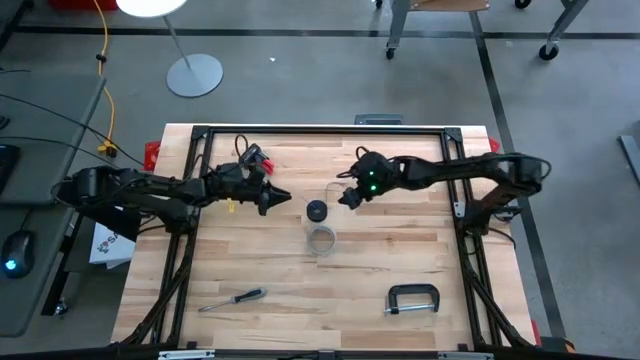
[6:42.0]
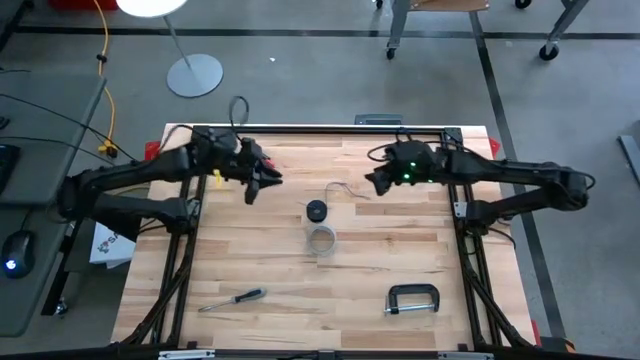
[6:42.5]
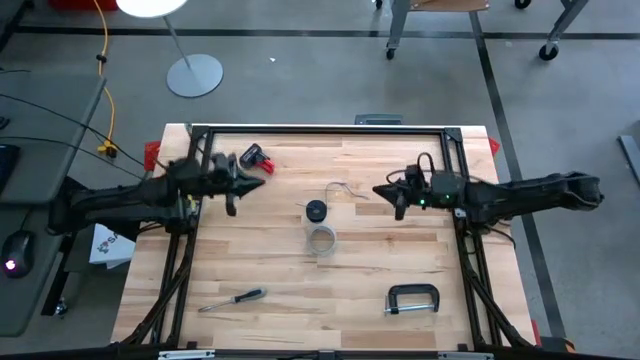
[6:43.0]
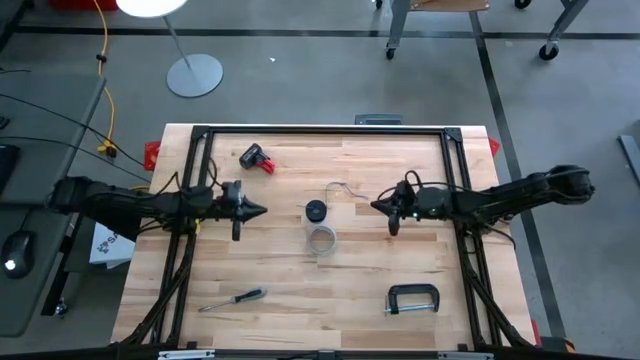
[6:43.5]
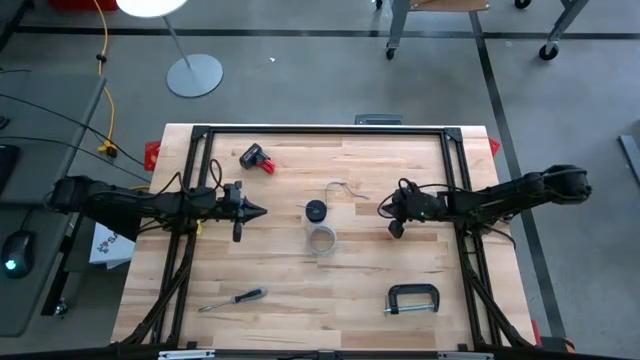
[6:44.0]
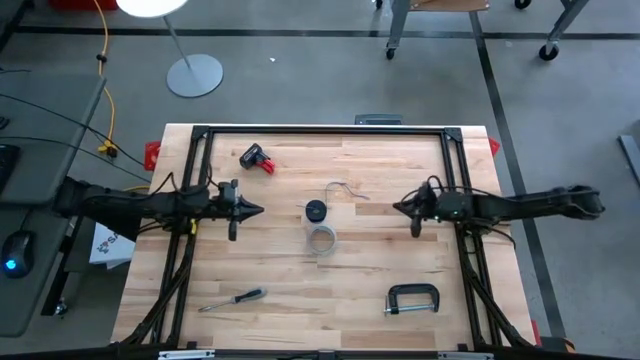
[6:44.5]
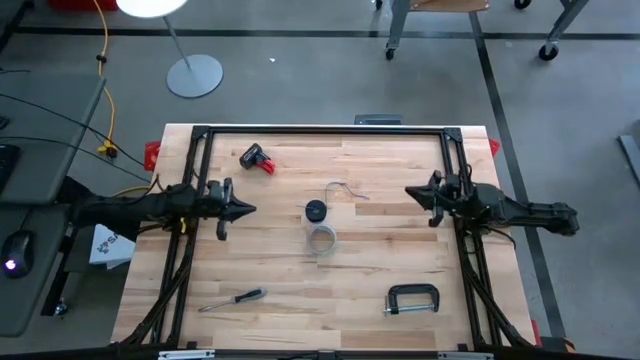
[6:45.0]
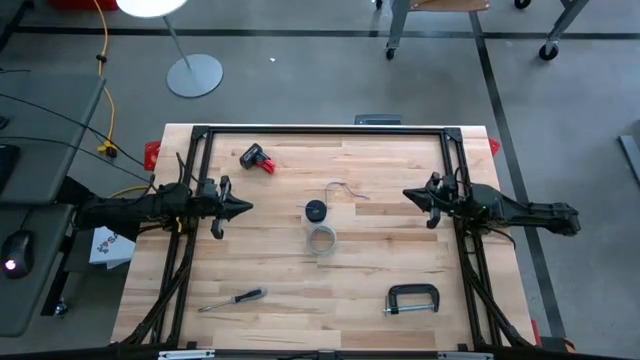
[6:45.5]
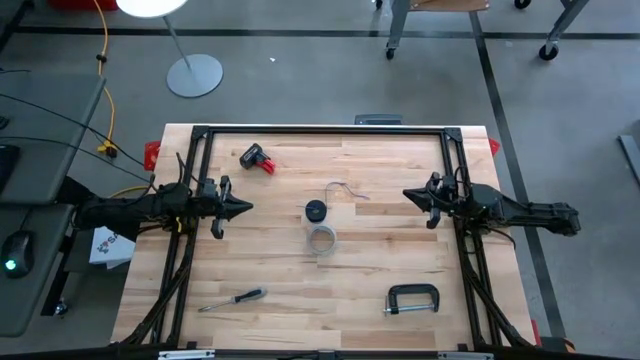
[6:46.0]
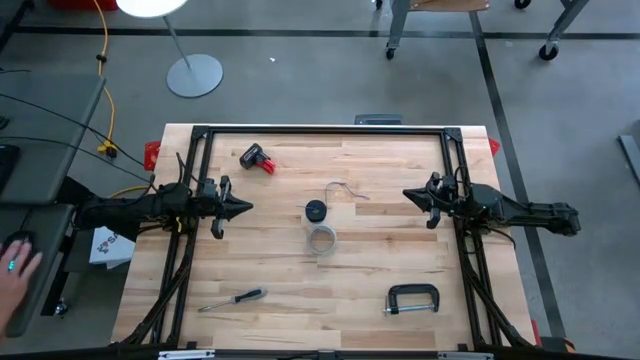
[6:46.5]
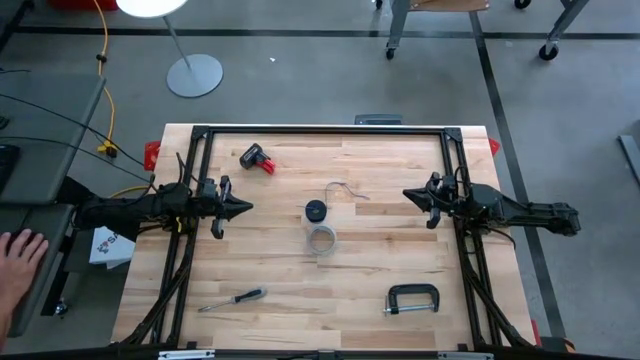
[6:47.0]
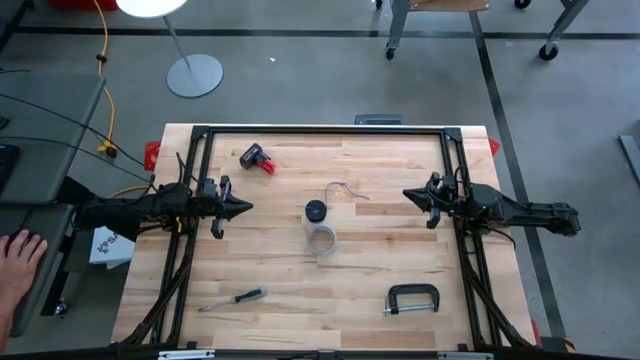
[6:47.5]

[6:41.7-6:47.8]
Task: Coil cords
Return to Home Position

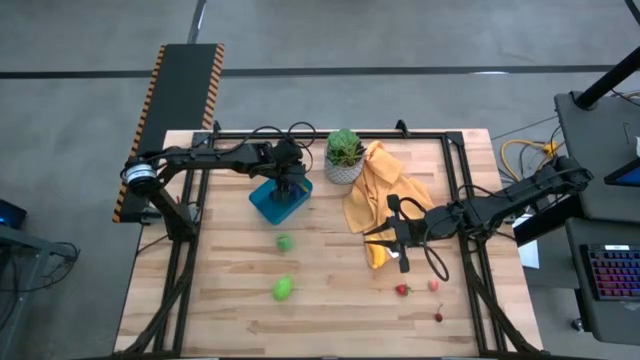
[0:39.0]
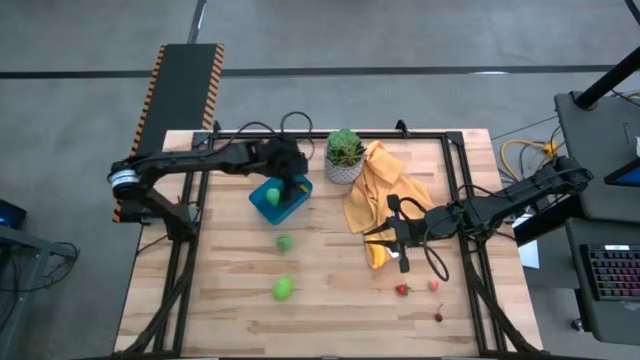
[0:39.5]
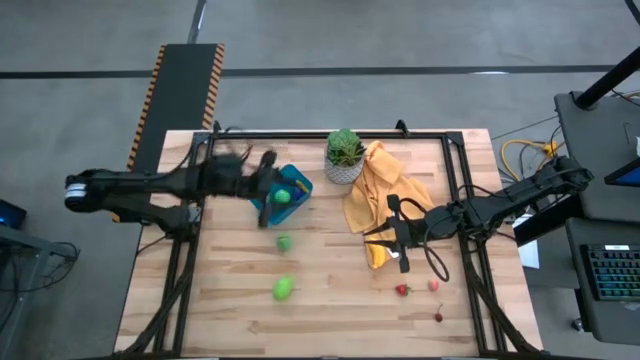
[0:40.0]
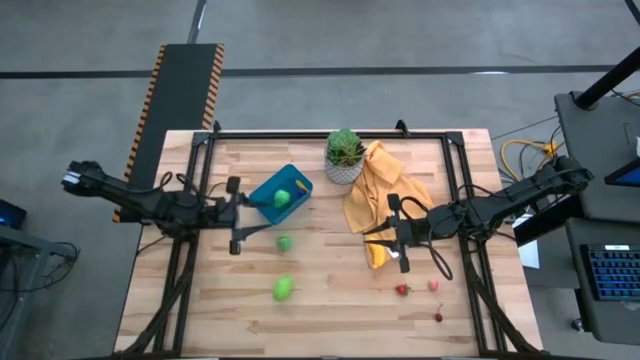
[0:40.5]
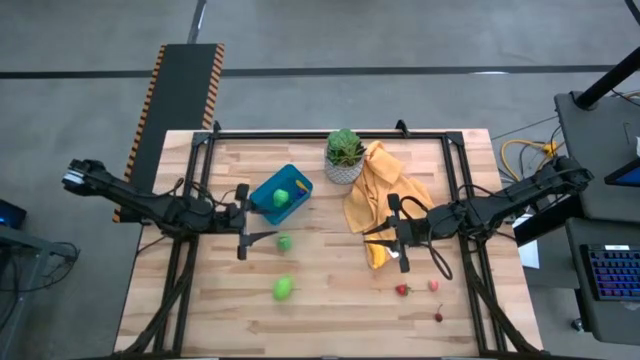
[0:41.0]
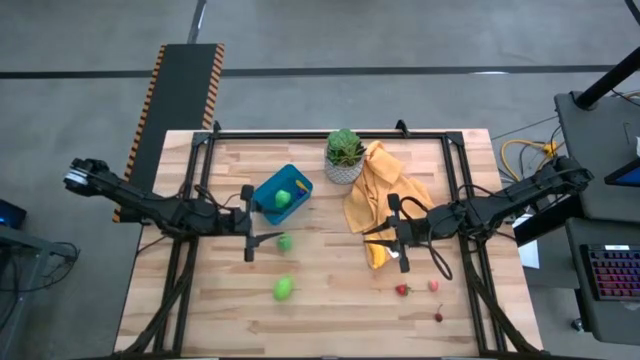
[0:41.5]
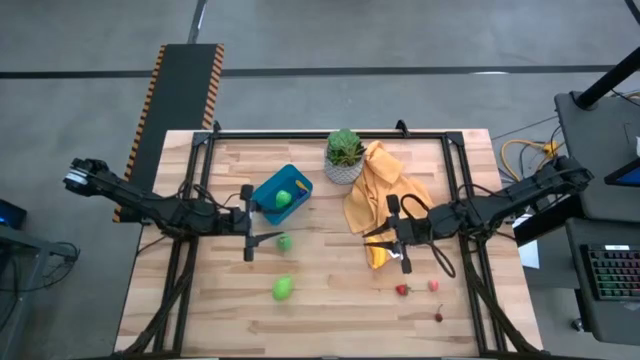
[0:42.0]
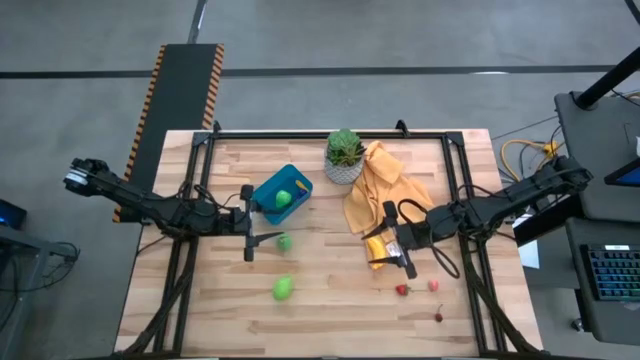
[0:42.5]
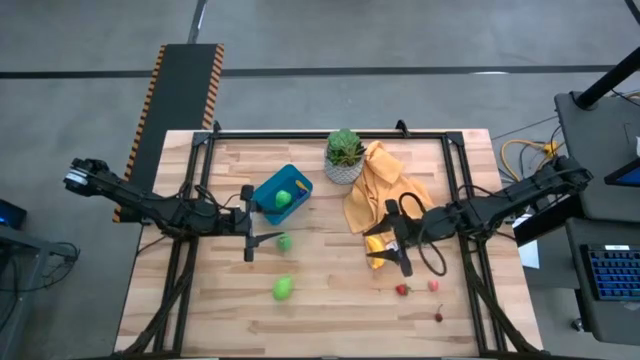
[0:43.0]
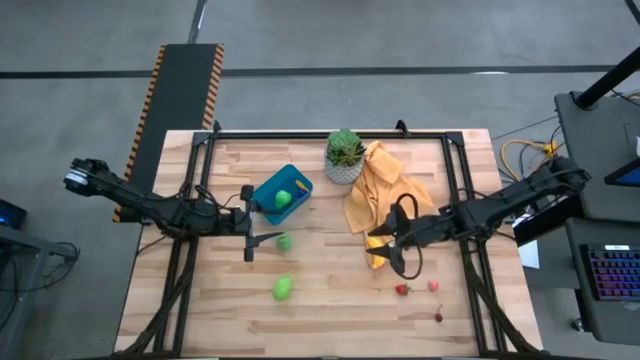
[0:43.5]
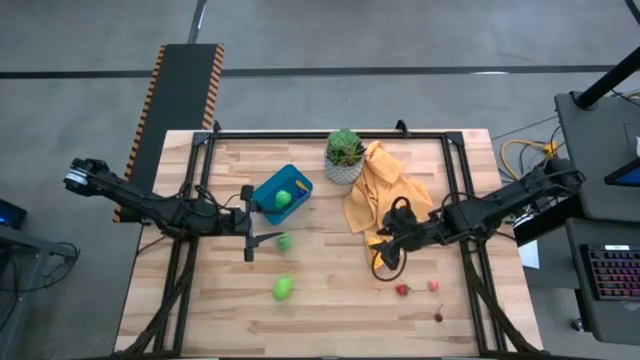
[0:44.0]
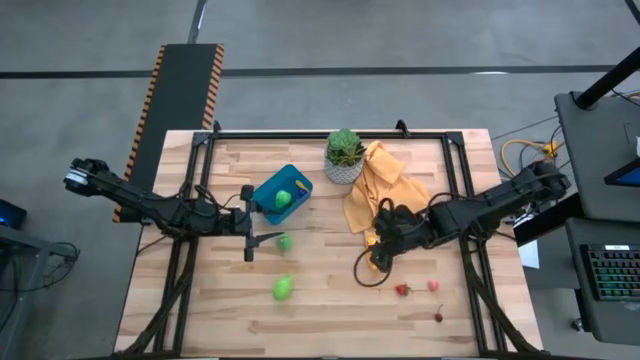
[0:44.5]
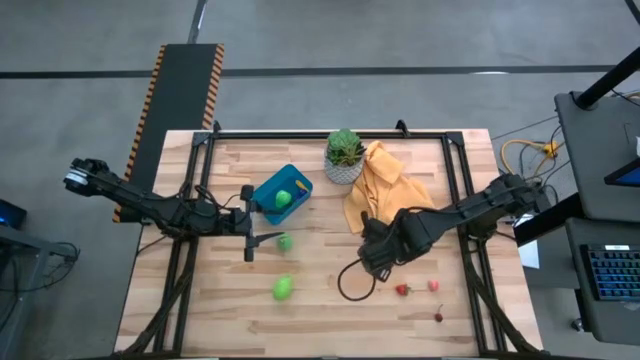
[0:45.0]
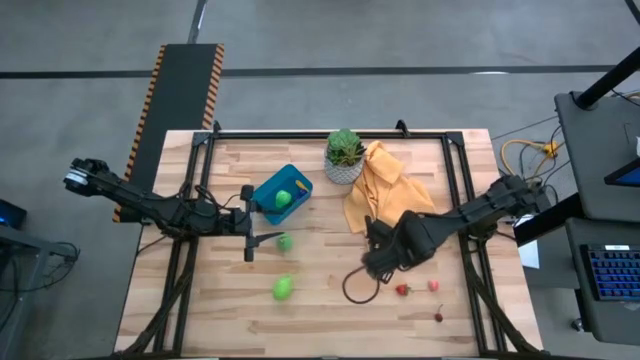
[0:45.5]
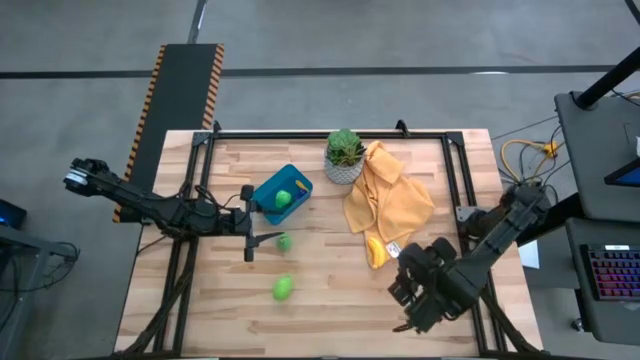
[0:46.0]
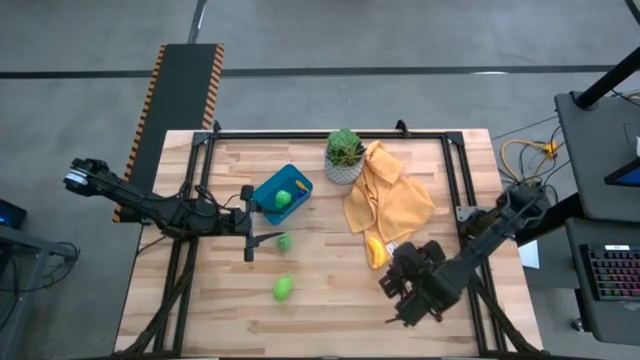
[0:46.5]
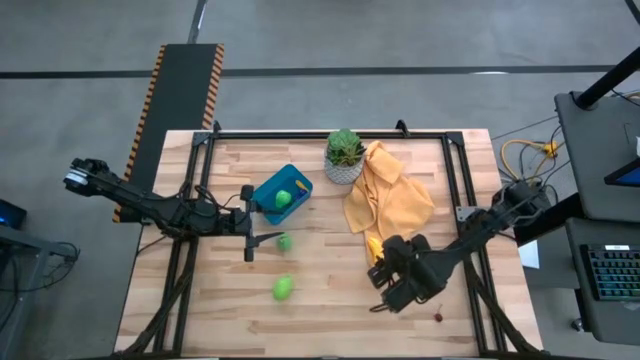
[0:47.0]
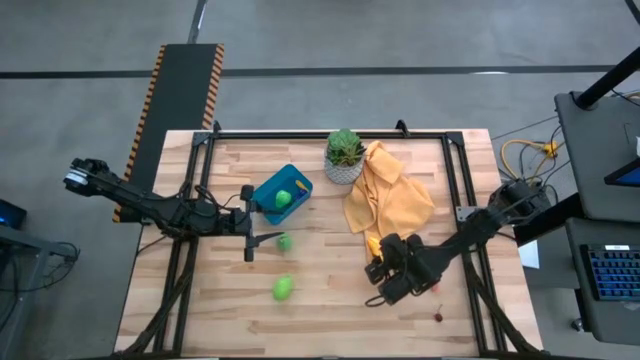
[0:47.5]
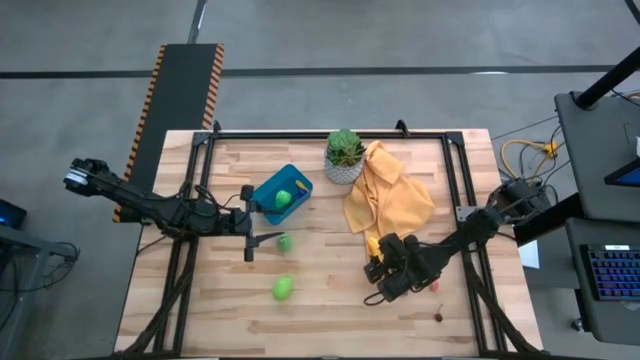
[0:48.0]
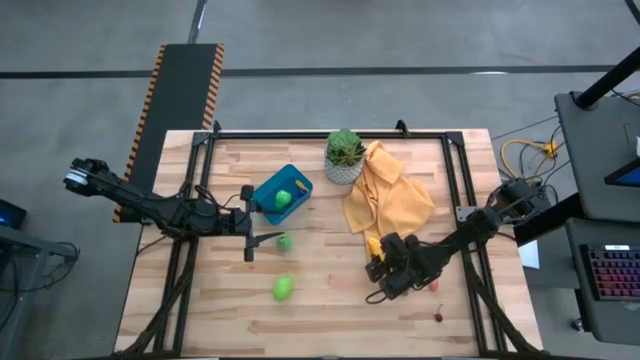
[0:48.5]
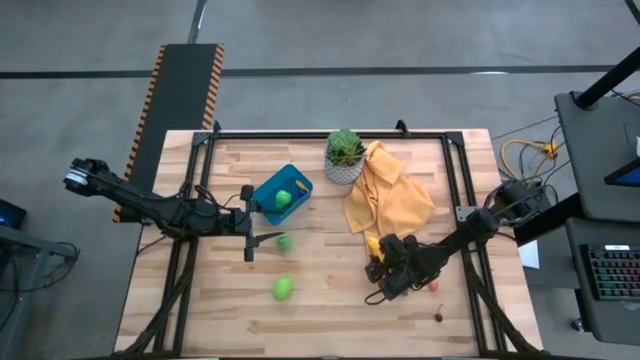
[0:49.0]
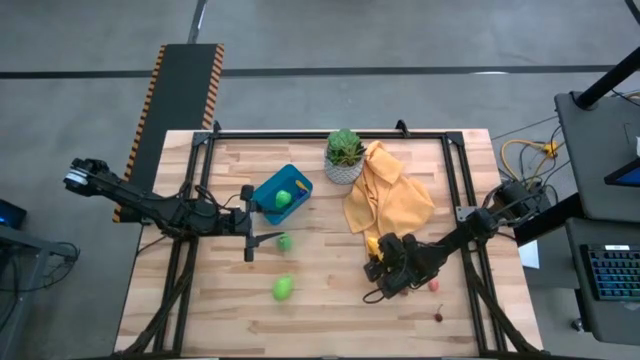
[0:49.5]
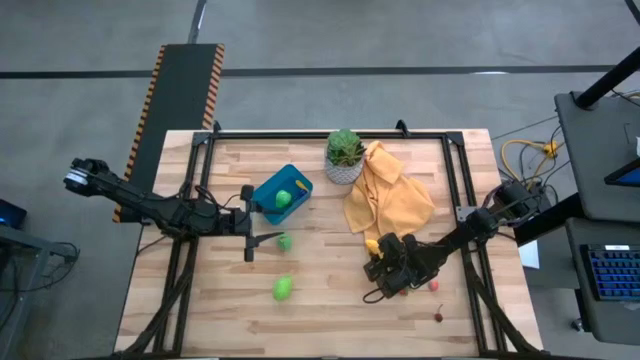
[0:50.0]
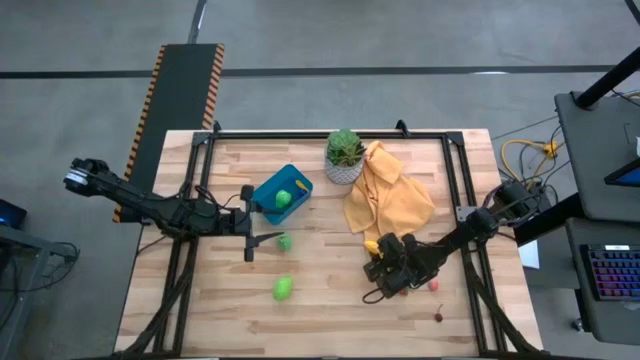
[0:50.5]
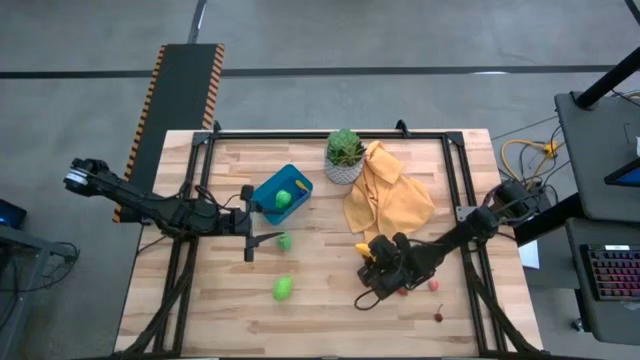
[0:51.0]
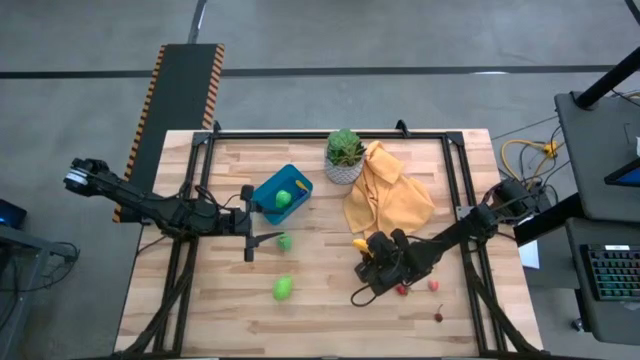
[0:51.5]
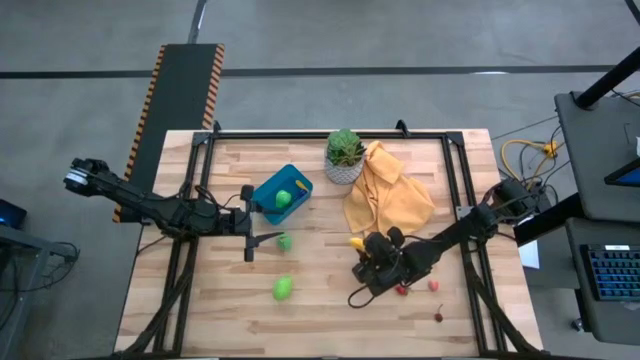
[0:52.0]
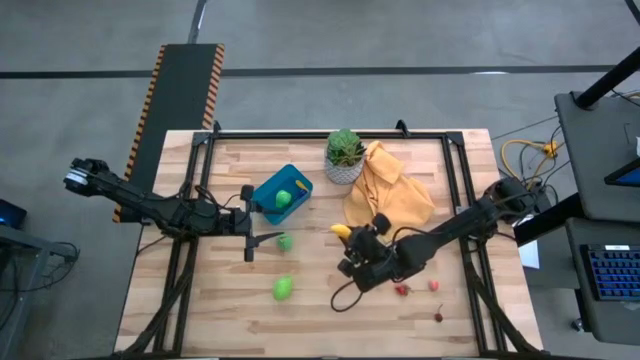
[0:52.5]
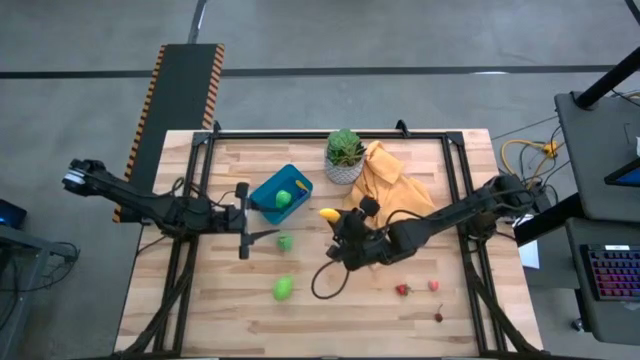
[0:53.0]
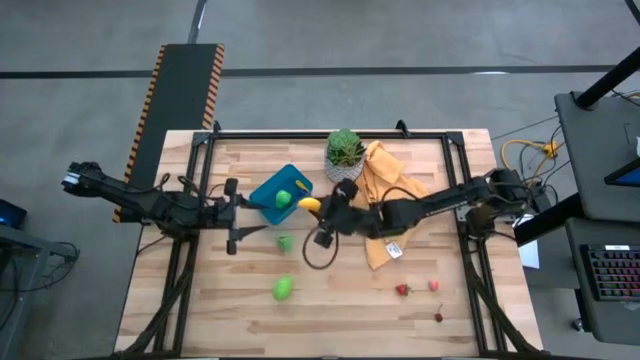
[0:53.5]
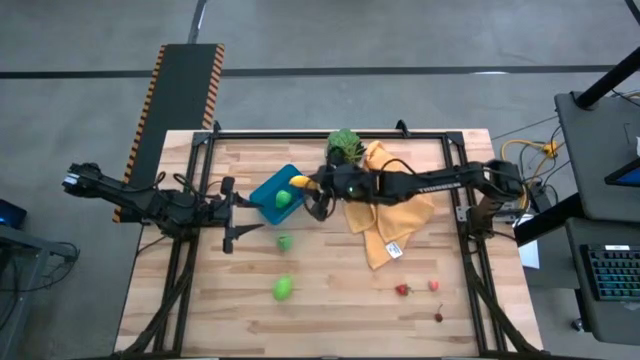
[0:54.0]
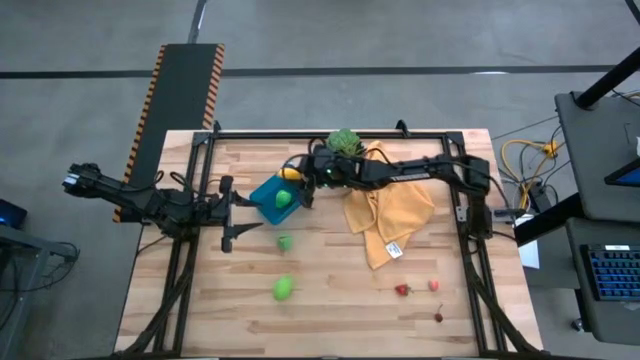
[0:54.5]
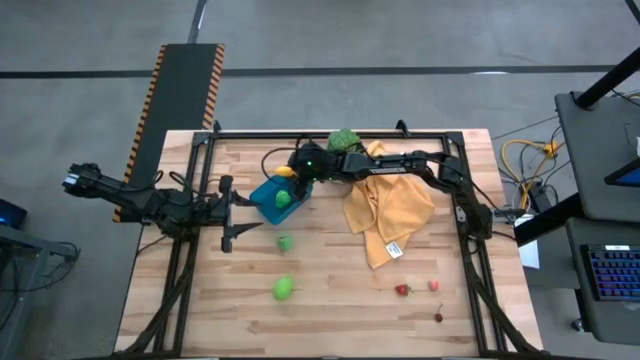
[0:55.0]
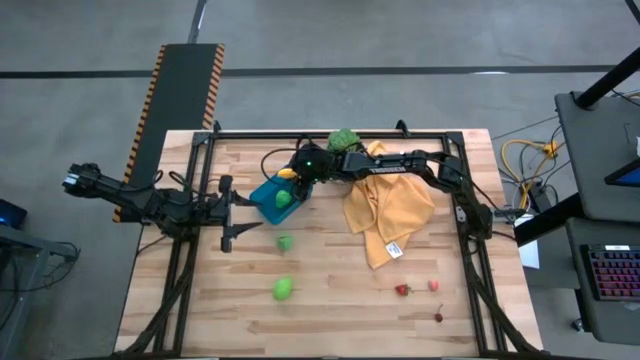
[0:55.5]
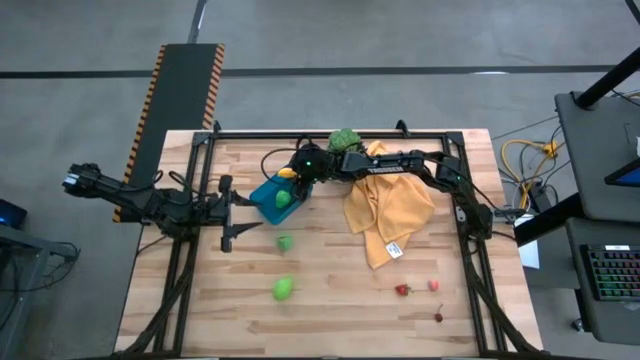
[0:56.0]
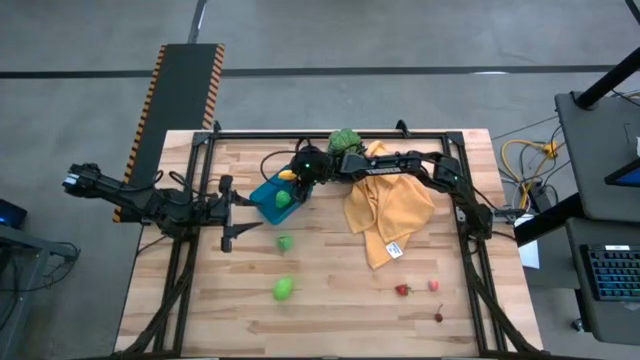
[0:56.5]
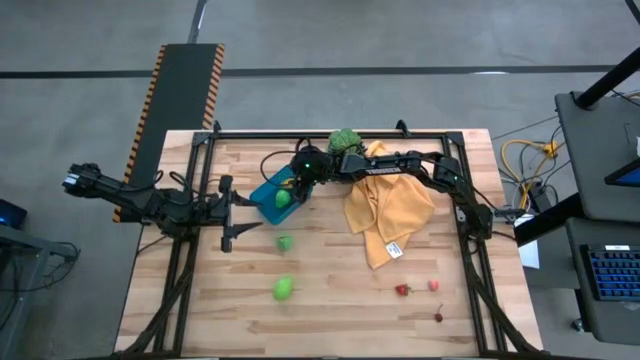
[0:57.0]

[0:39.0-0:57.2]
Task: Pick and placing Produce into tupperware
Put the yellow banana into the blue bin
